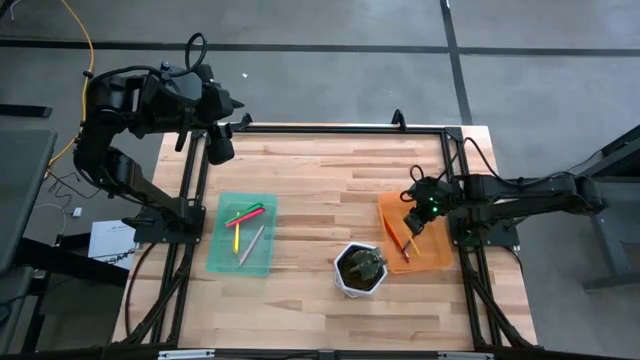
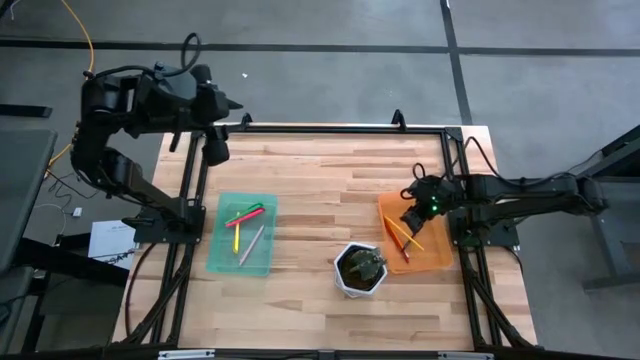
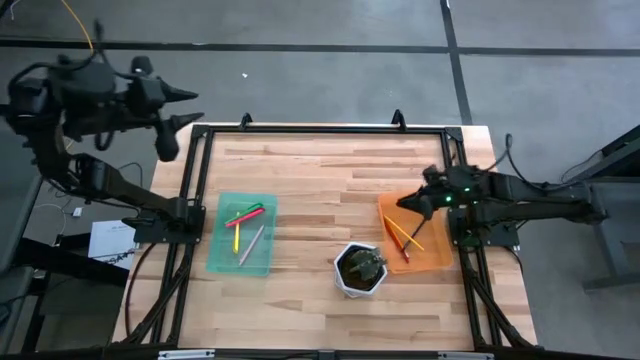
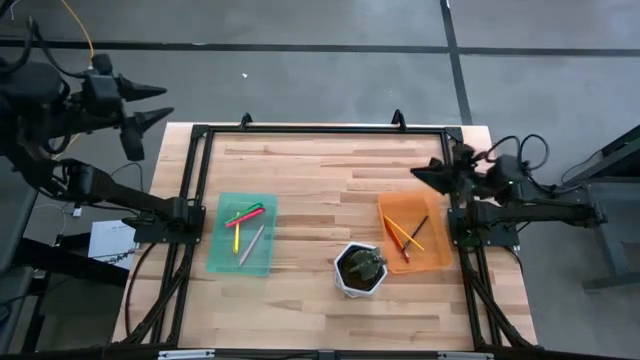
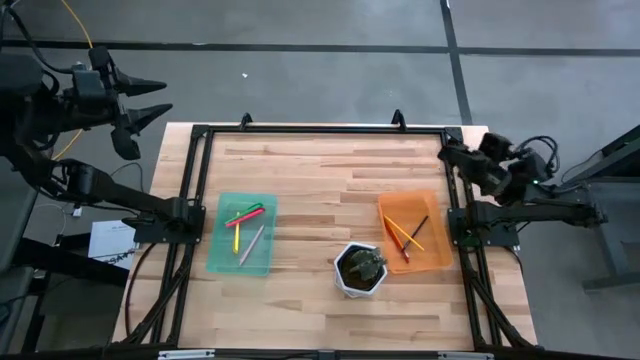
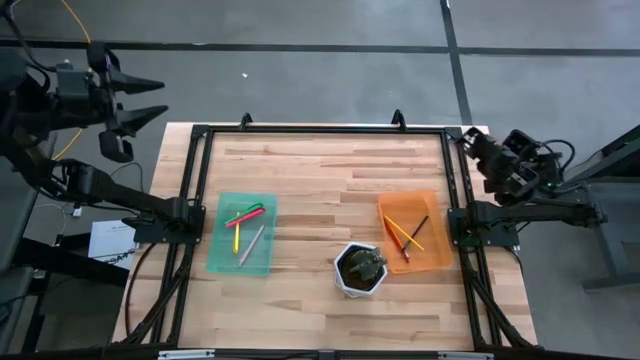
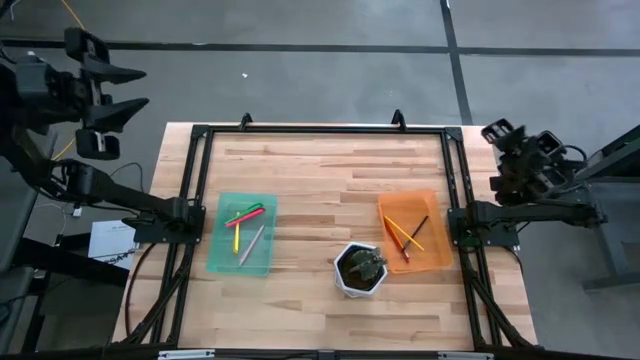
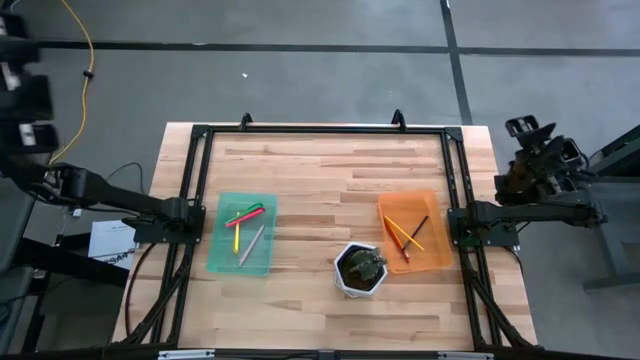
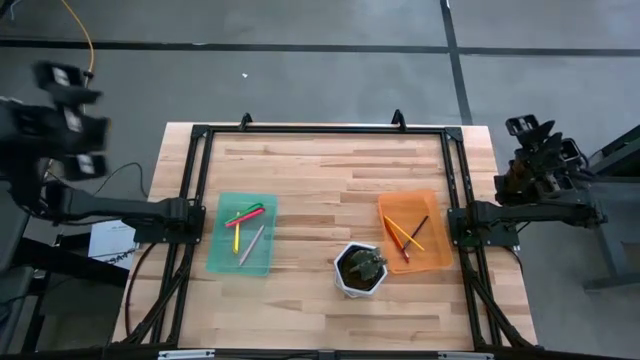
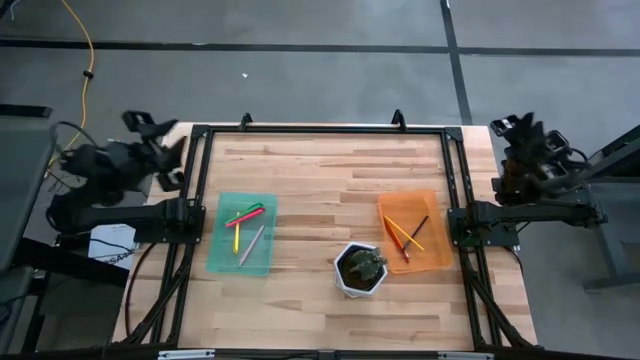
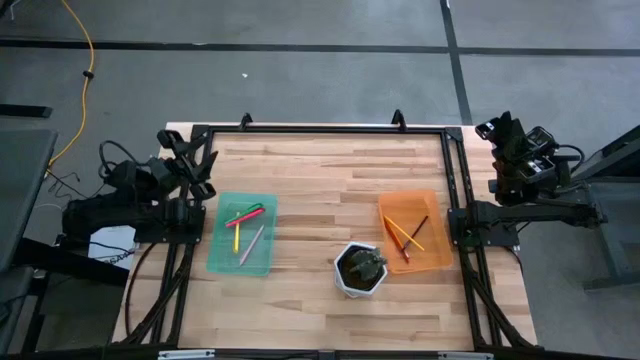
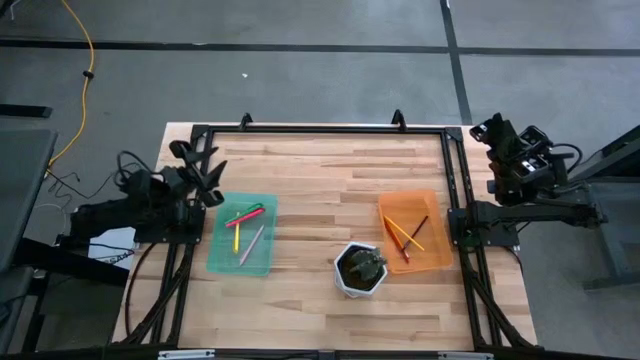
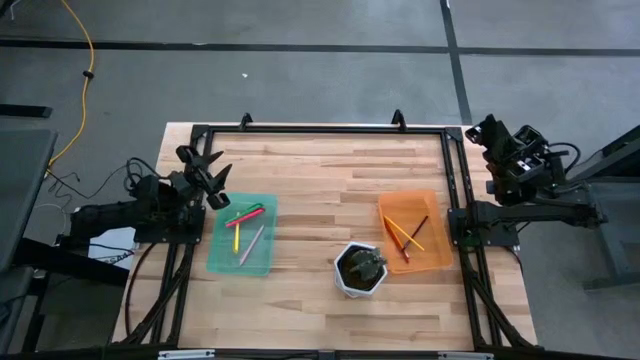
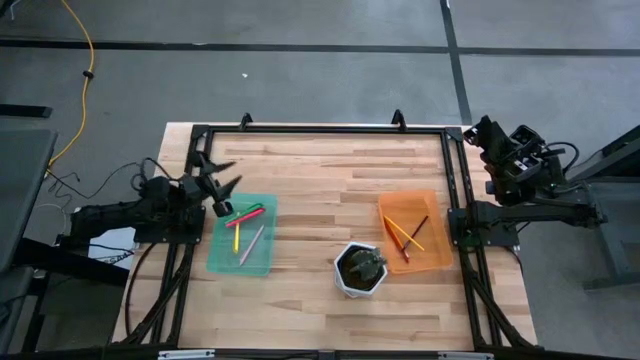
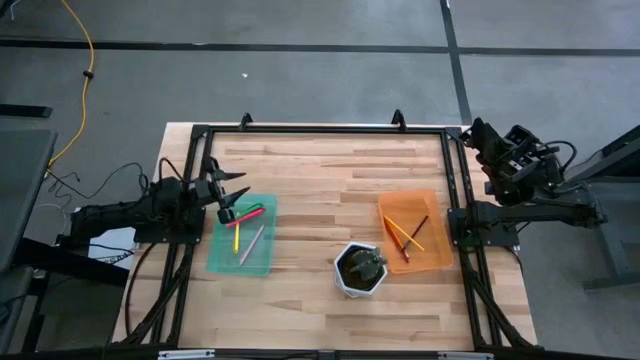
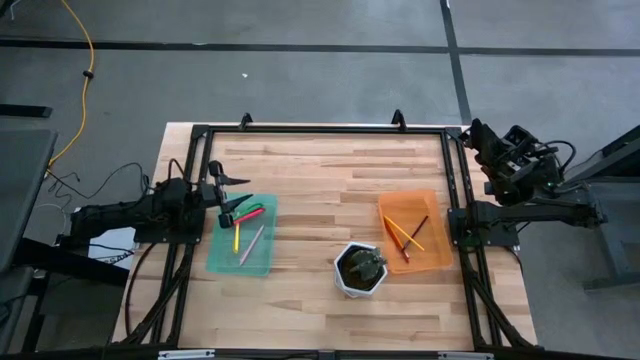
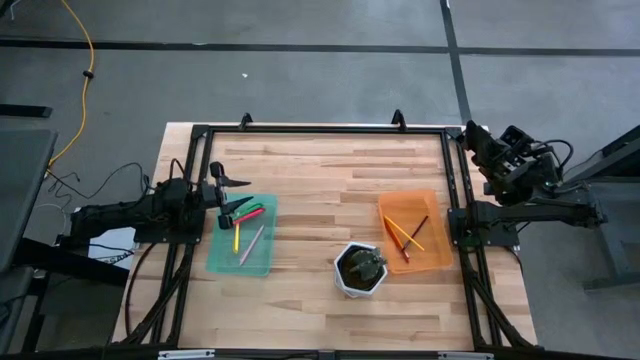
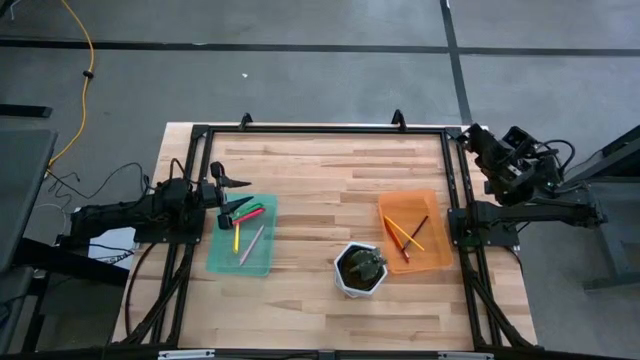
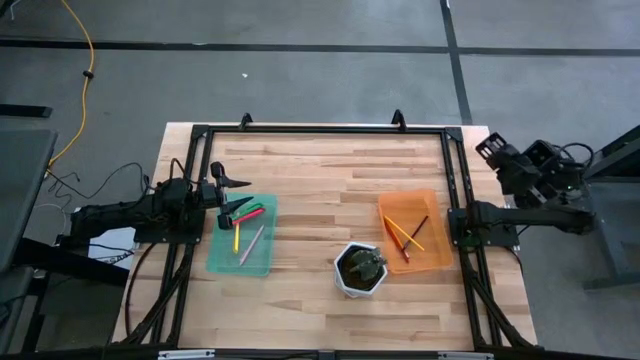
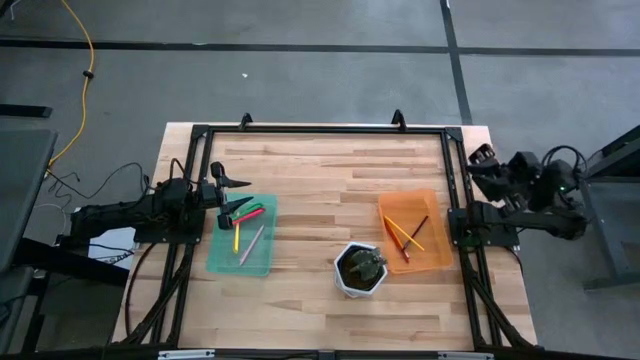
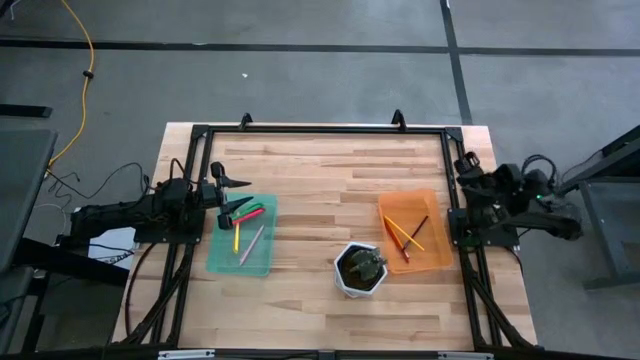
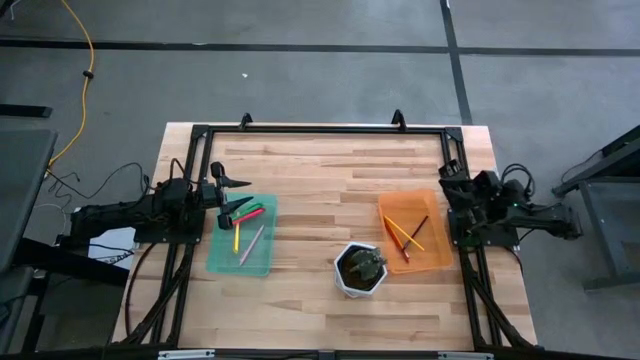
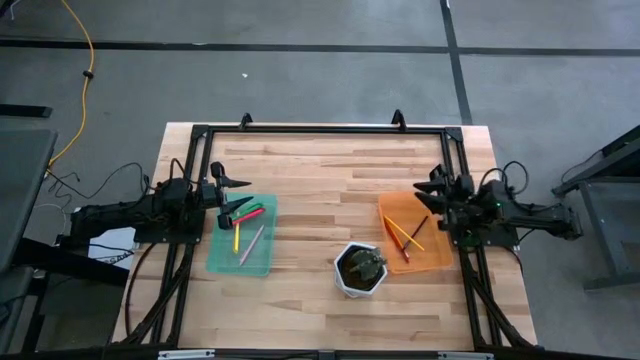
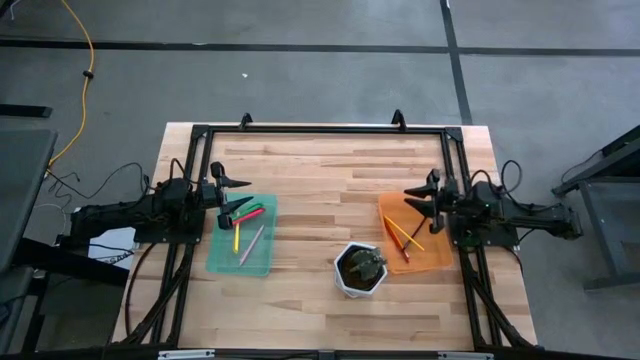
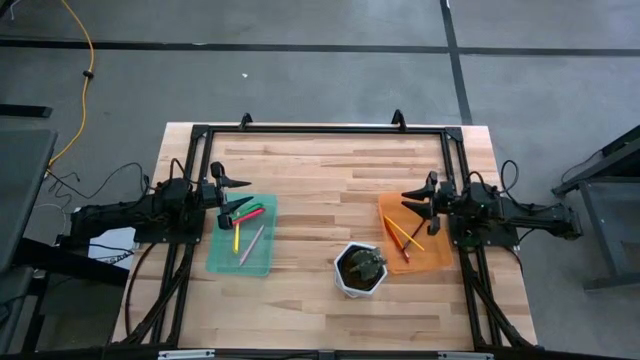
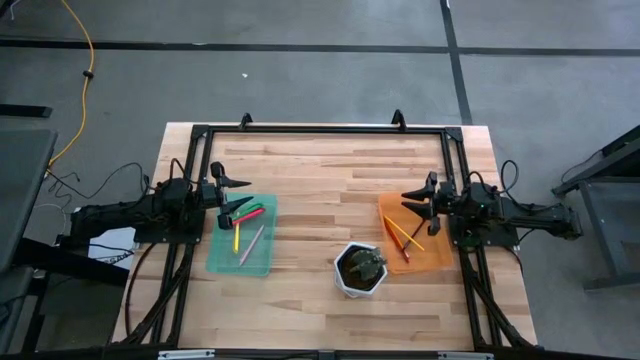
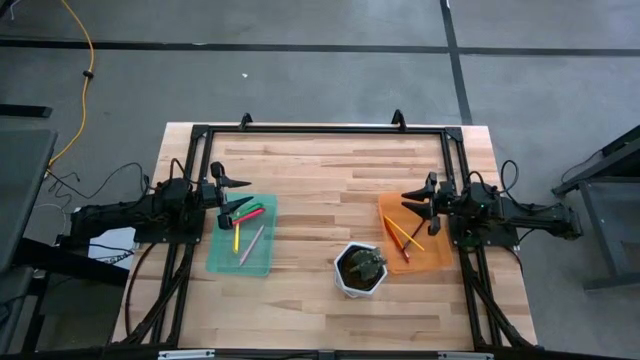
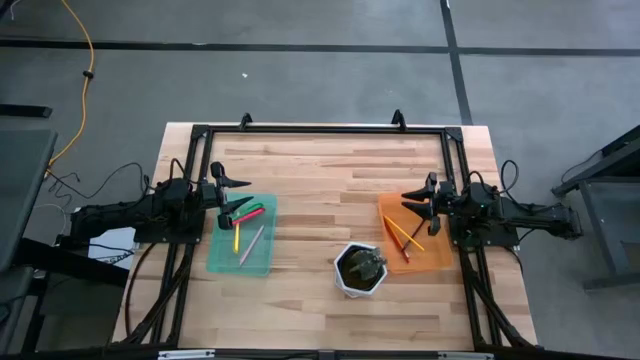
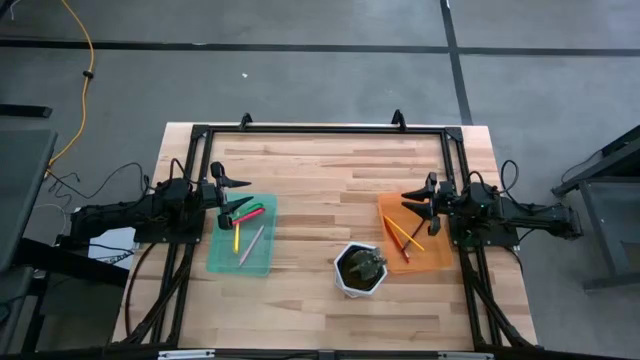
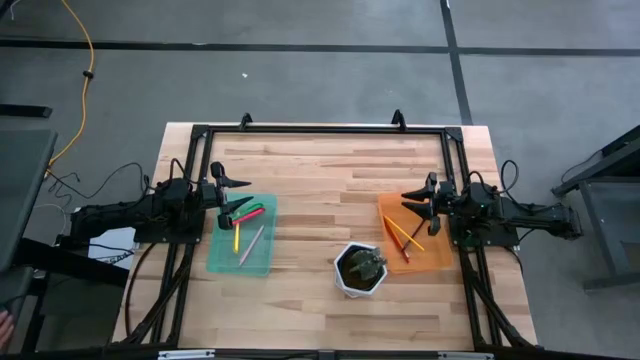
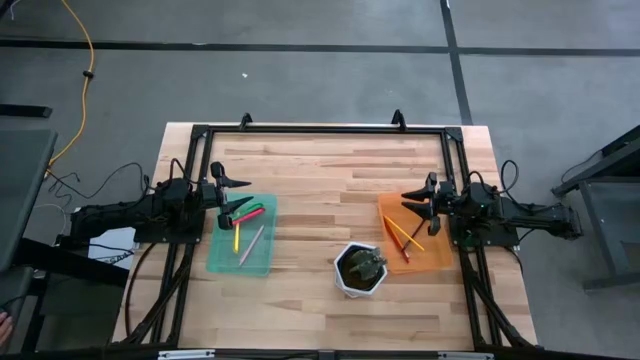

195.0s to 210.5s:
Task: Sort pens & pencils
Return to Home Position

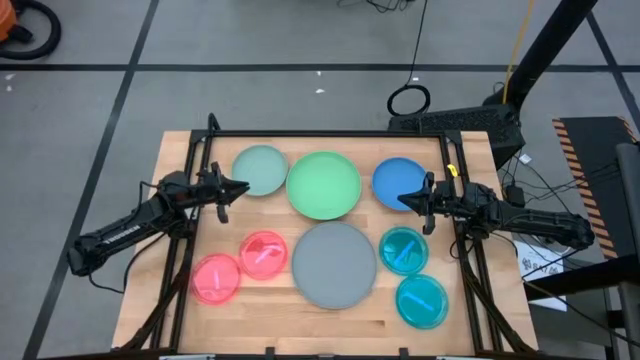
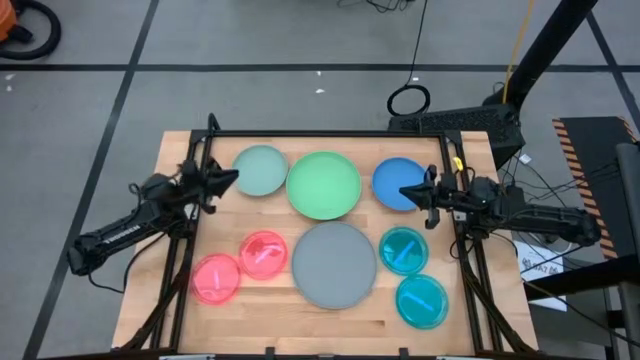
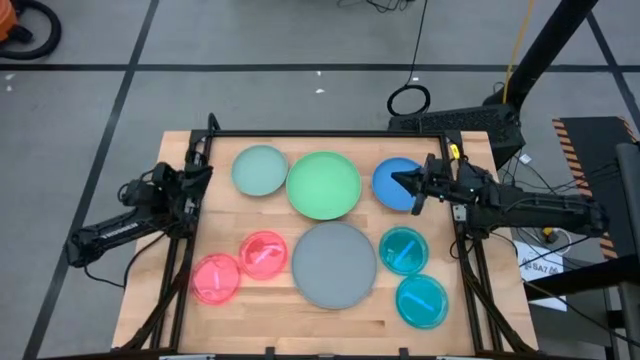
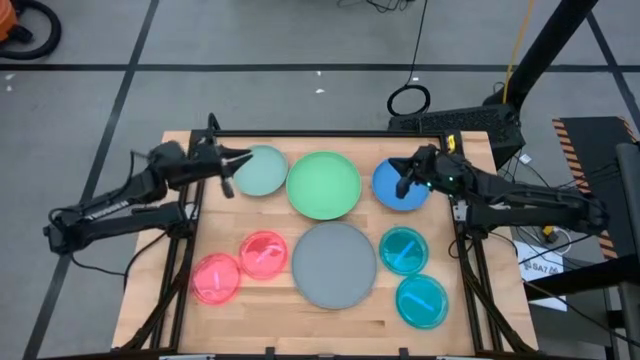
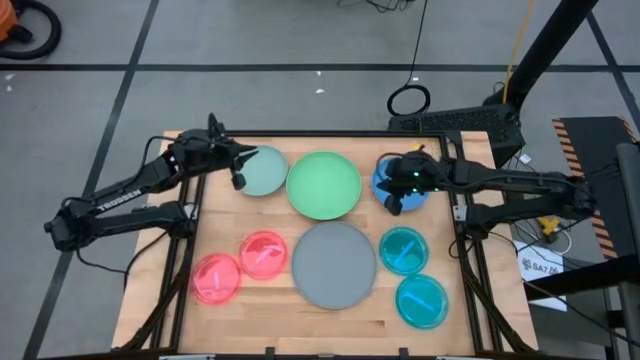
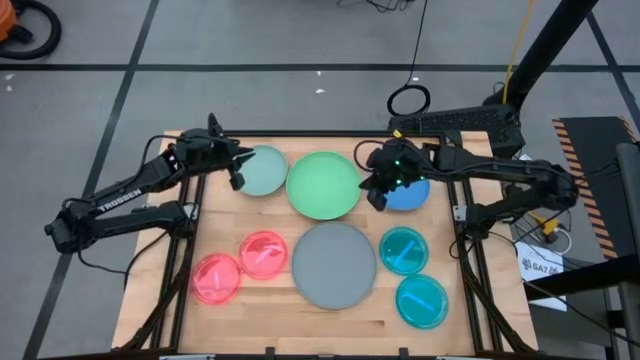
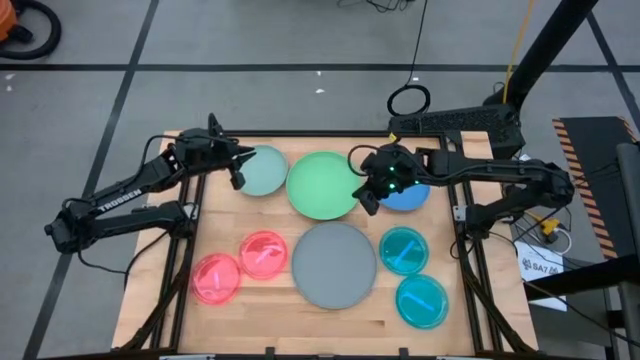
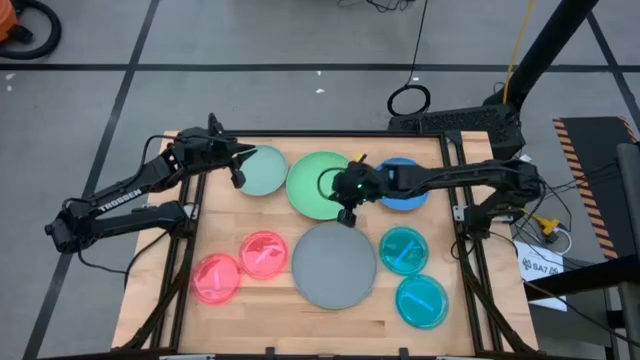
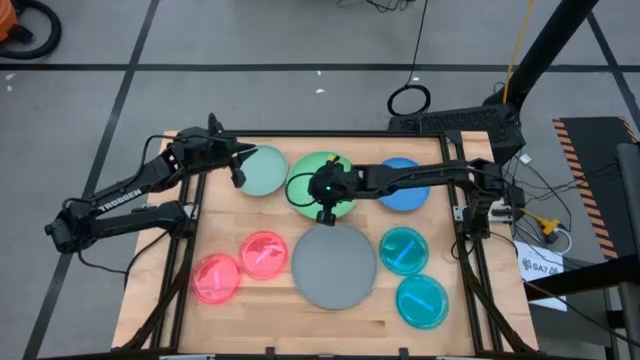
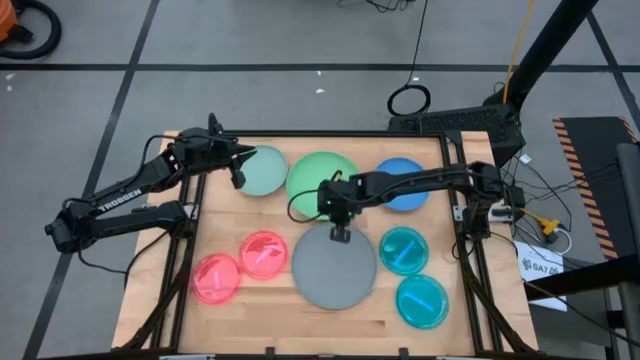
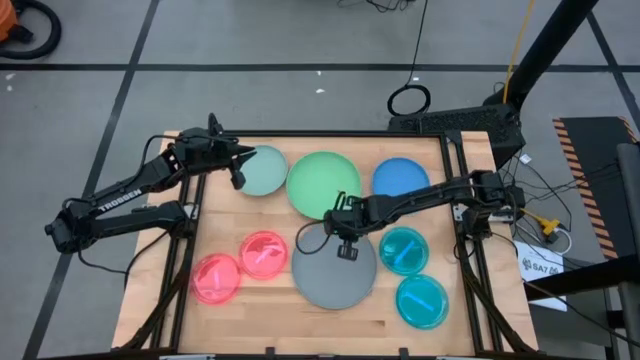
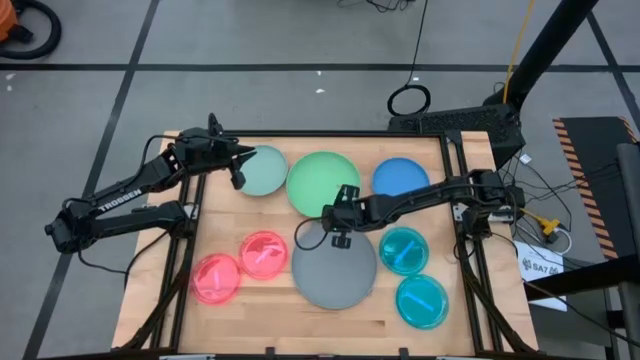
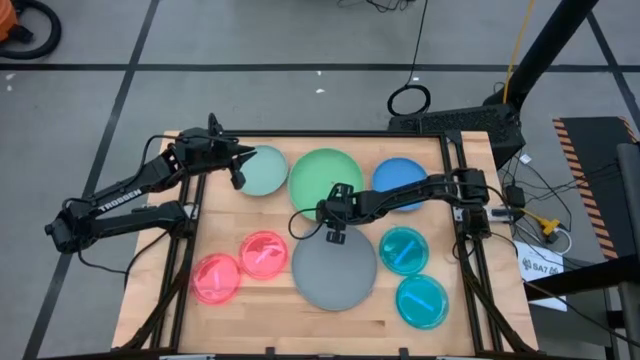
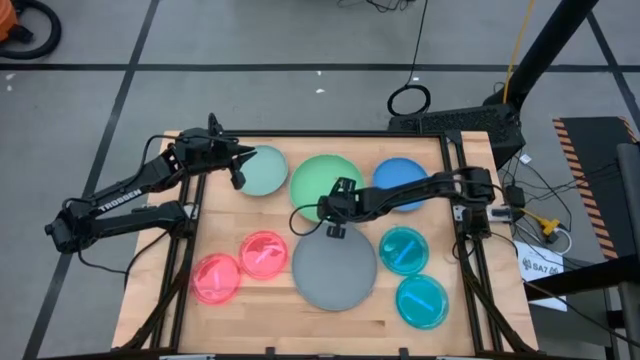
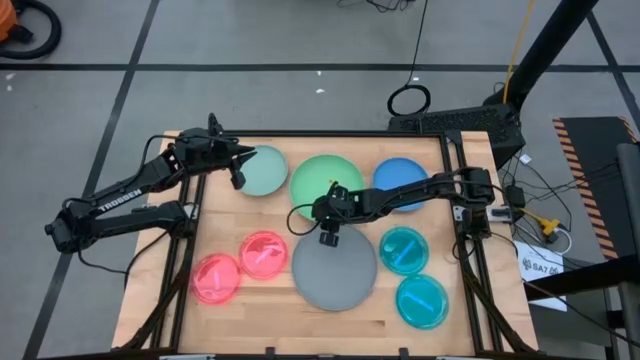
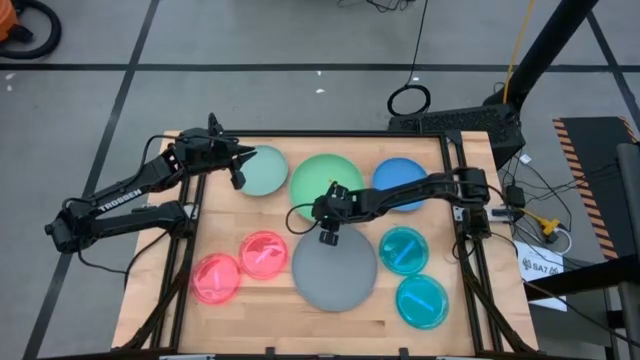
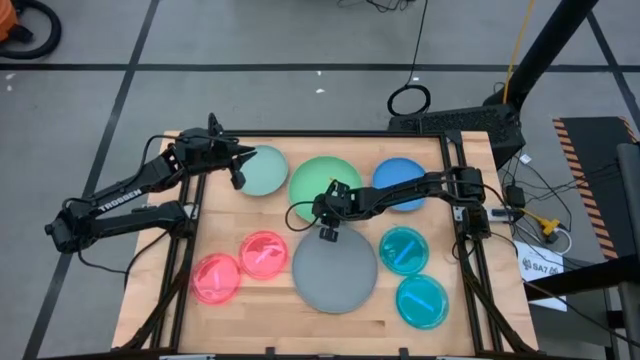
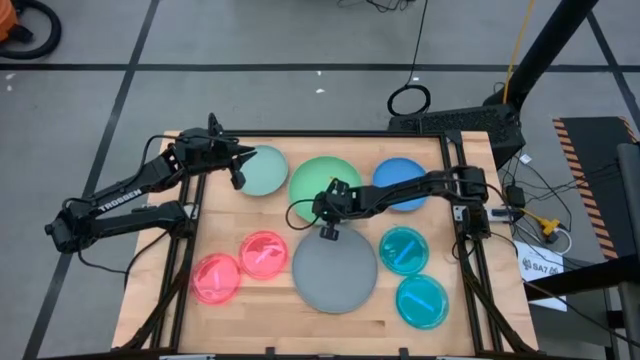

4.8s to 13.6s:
Task: Stack plastic plates
Stack the green plate on the gray plate
